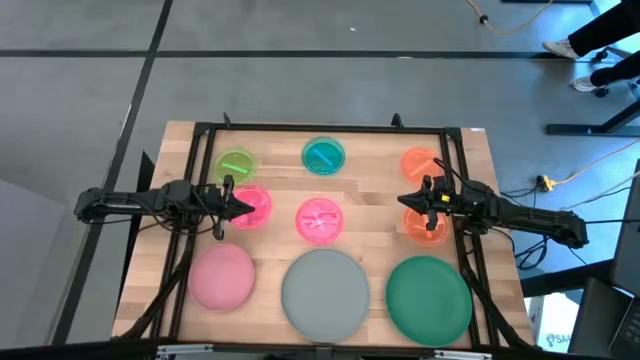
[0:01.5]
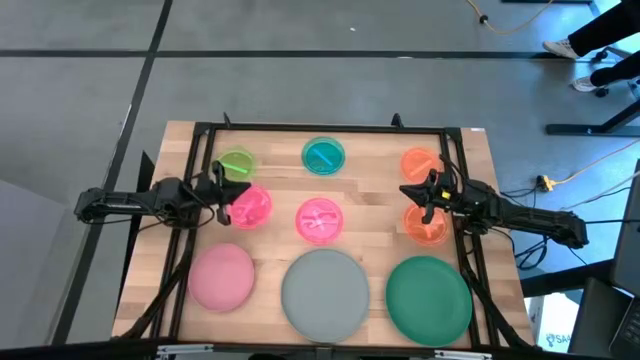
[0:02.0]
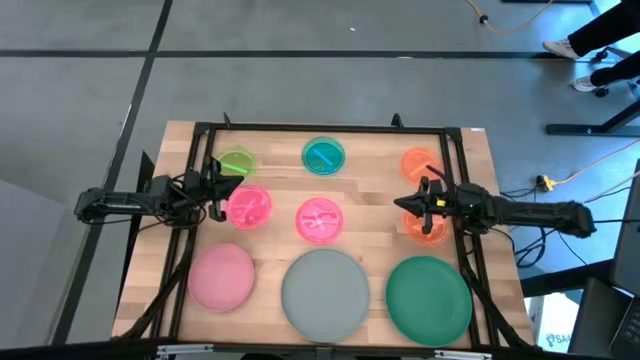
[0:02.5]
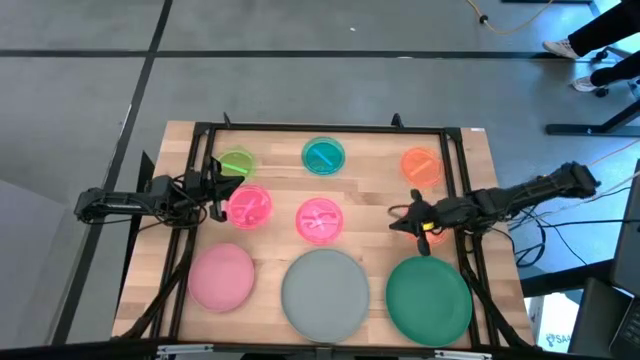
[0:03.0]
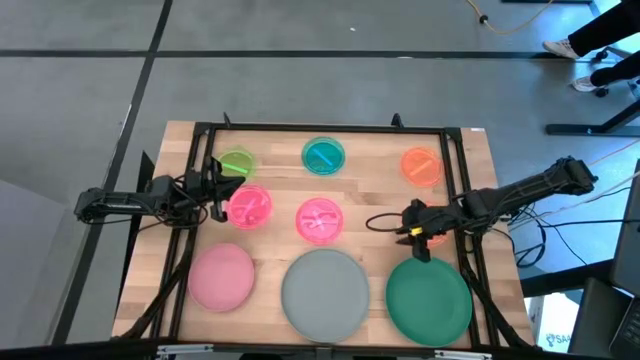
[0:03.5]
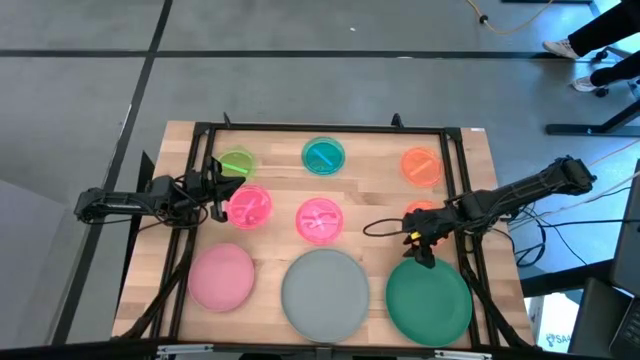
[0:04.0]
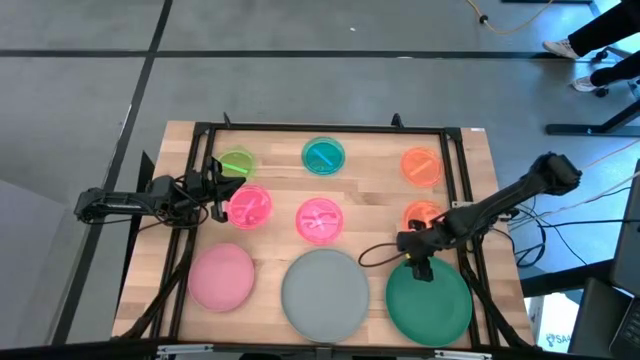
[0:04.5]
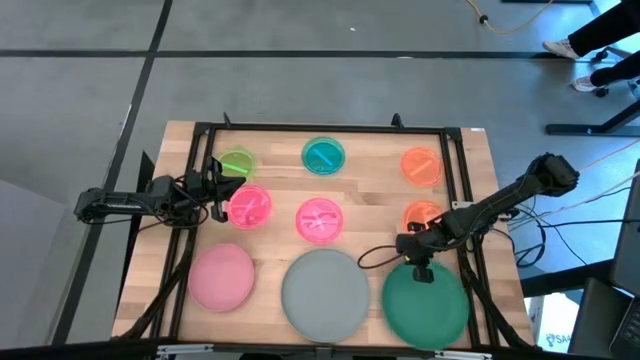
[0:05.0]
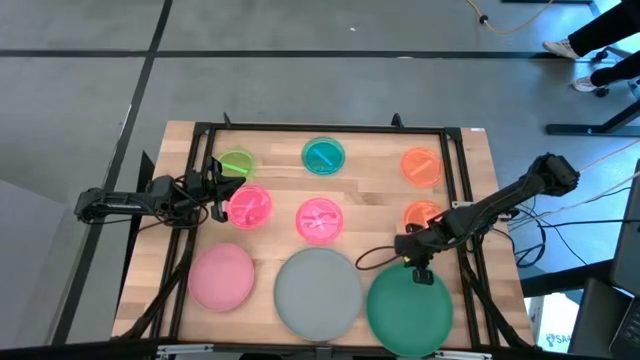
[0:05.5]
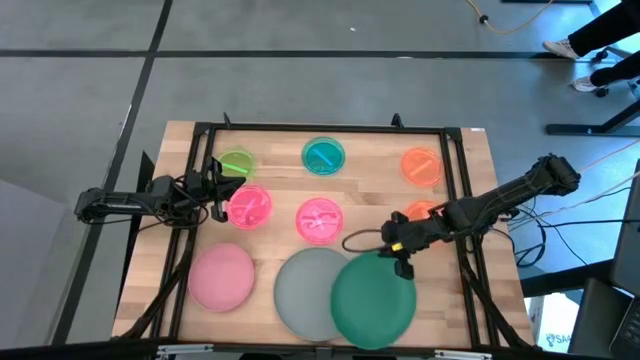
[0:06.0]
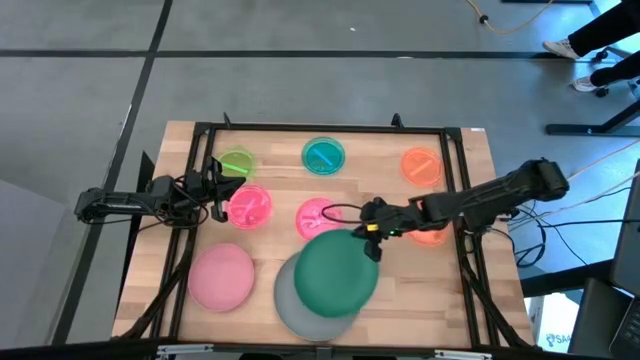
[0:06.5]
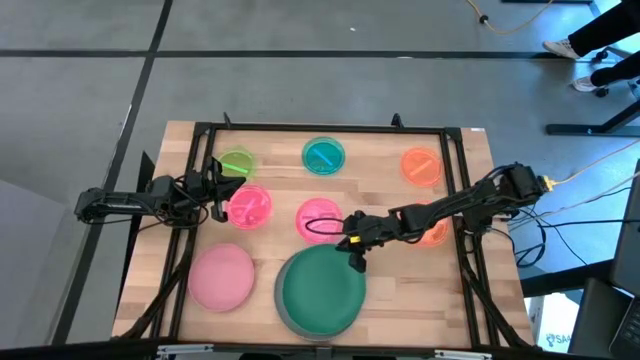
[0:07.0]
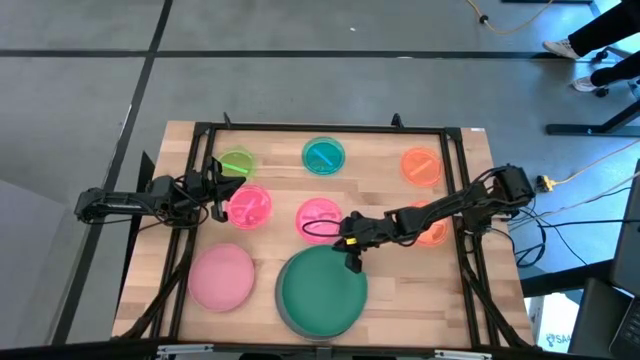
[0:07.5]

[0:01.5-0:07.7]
Task: Stack plastic plates
Stack the green plate on the gray plate

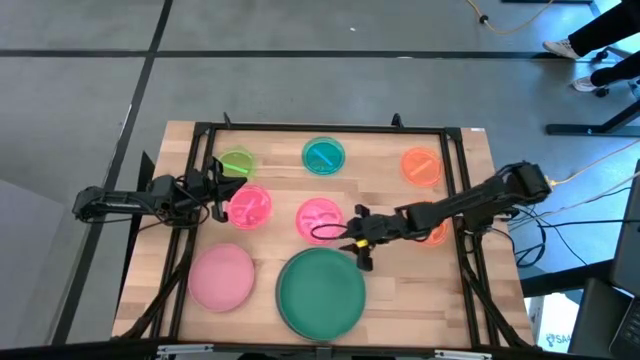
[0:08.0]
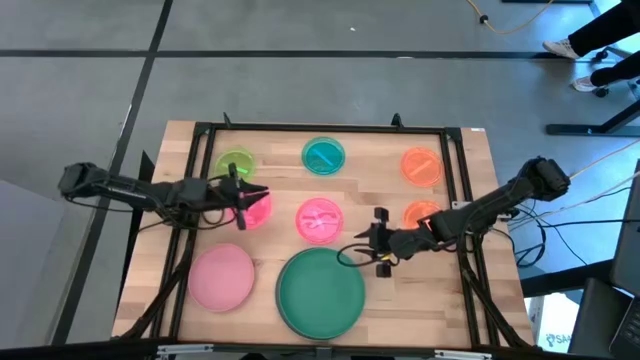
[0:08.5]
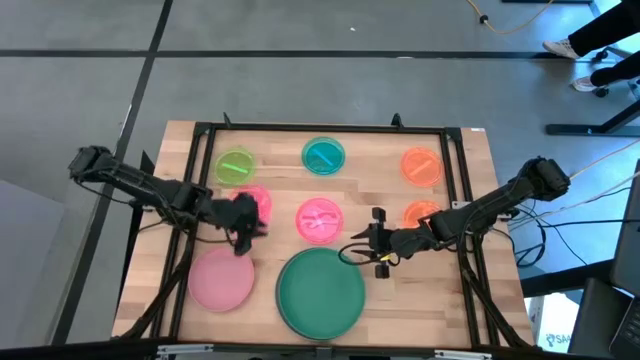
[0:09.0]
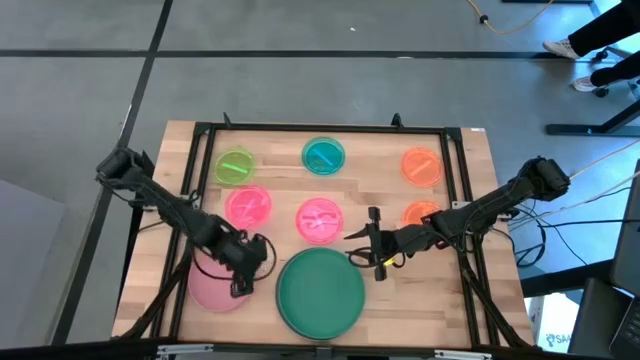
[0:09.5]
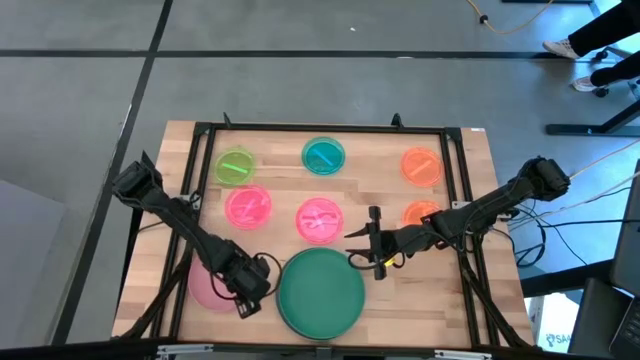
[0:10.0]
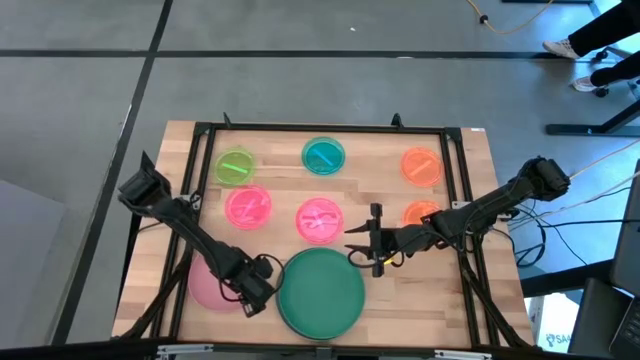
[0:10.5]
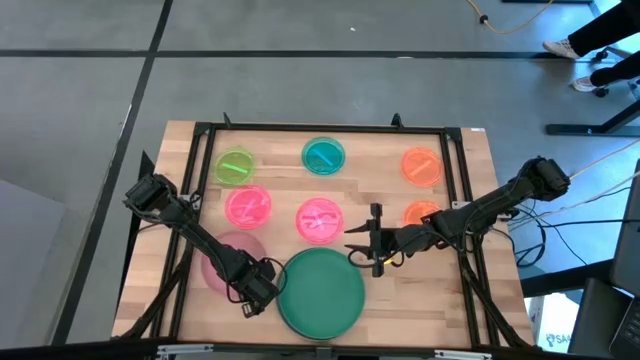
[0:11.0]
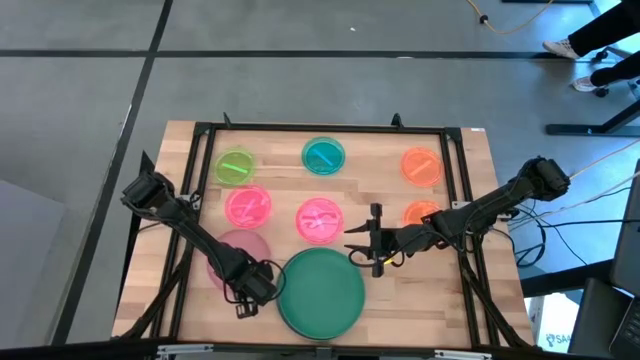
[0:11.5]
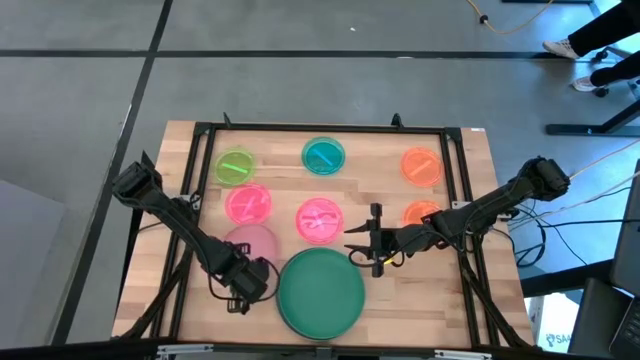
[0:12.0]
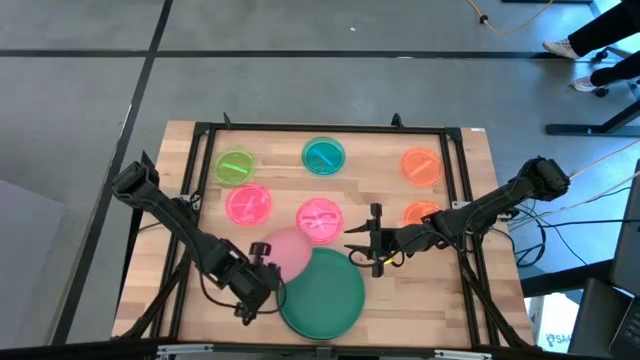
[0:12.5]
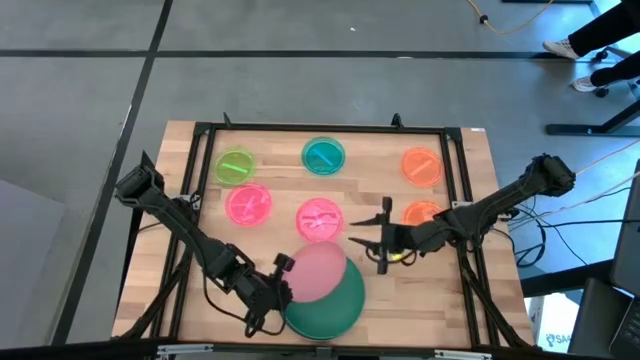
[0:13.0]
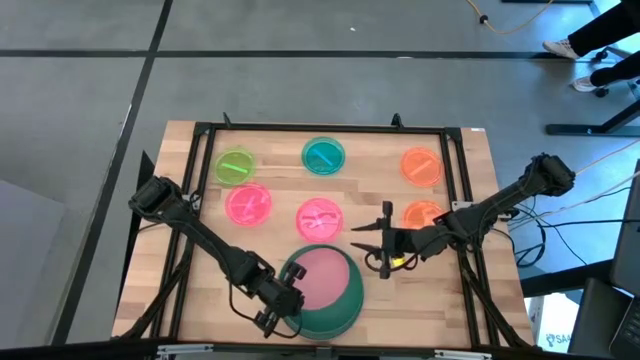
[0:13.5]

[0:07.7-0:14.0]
Stack the pink plate on the green plate

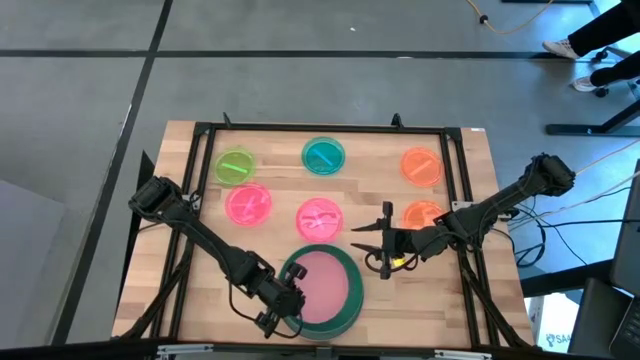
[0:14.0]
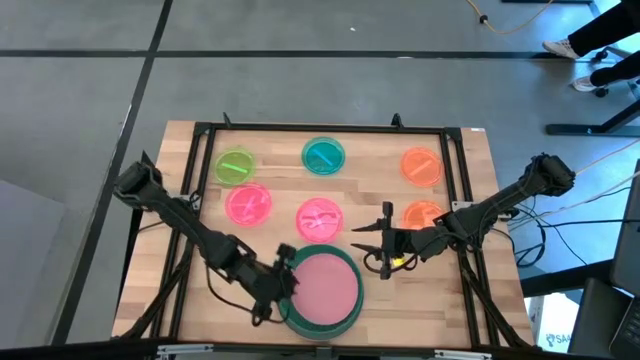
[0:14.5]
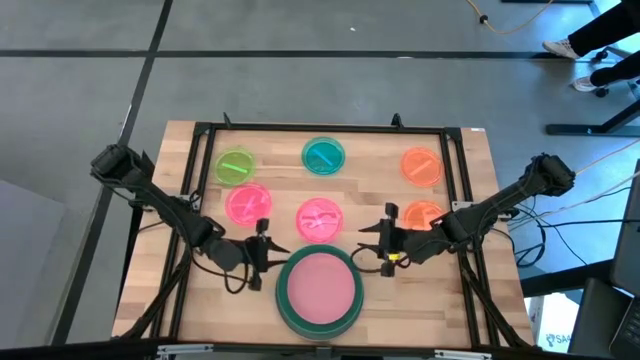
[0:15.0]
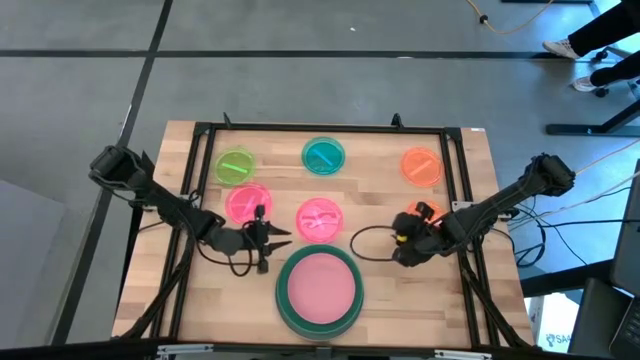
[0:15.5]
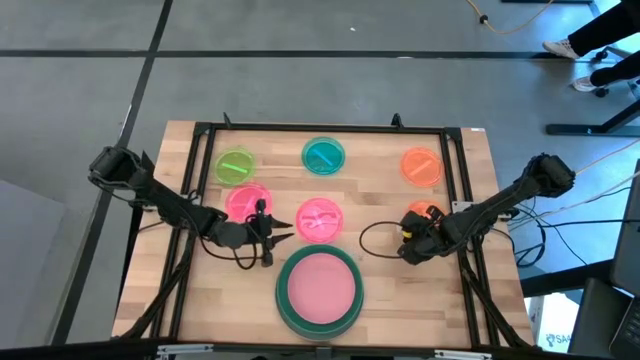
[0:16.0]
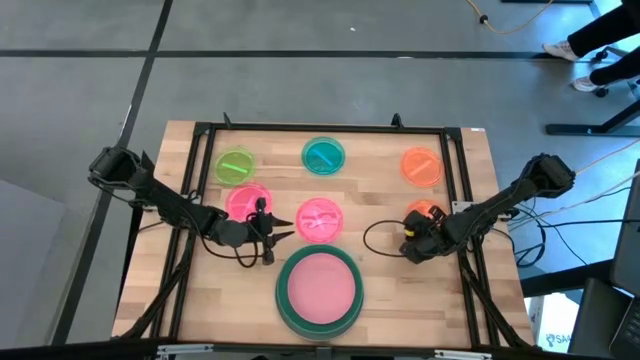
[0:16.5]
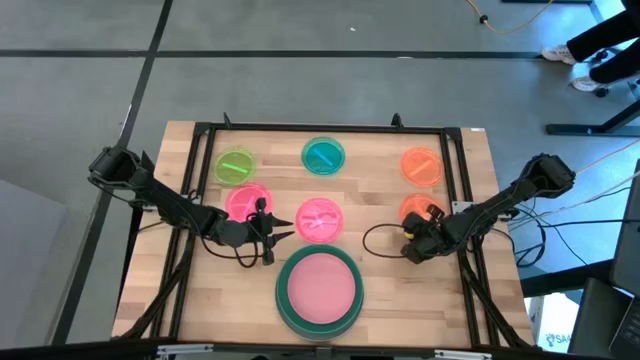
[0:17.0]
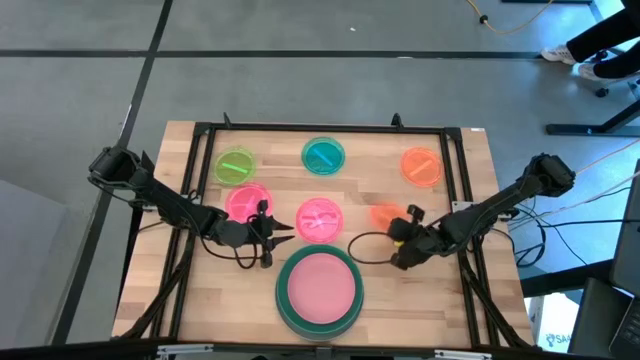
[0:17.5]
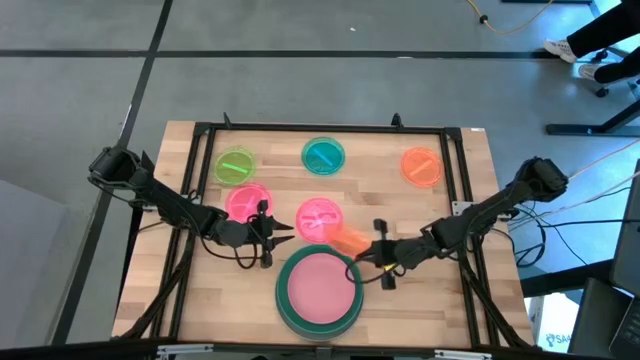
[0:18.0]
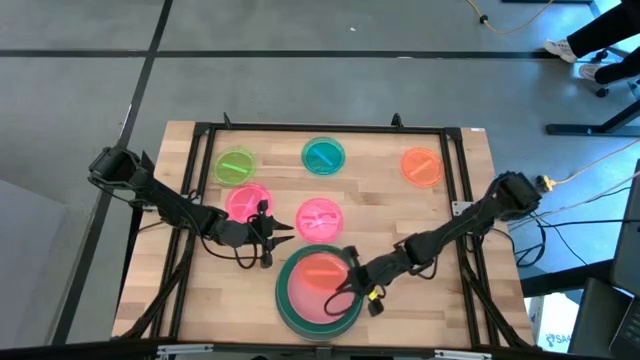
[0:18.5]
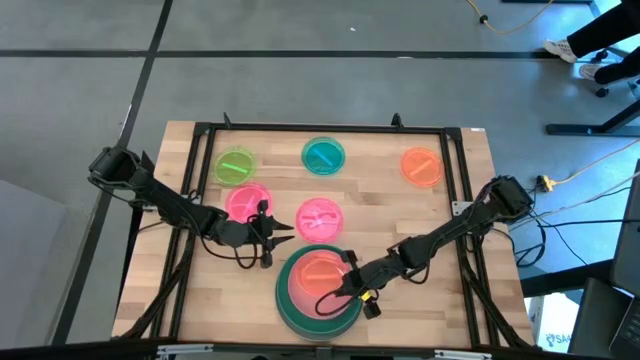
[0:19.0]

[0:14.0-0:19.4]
Stack the bottom orange transparent plate on the pink plate

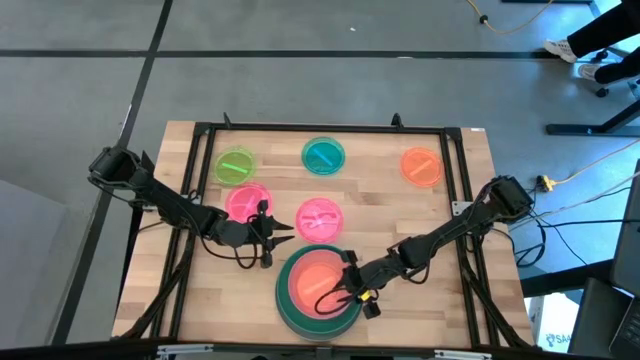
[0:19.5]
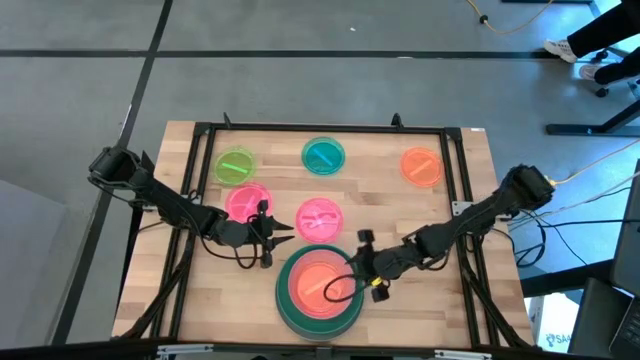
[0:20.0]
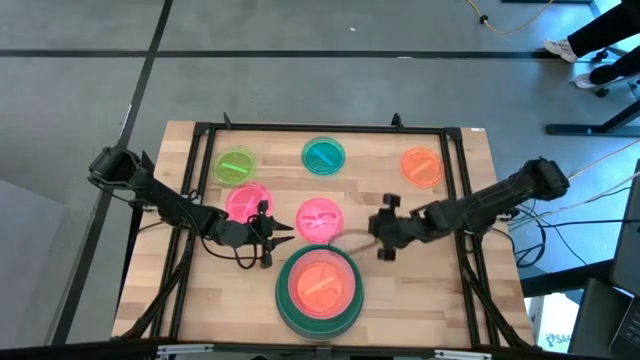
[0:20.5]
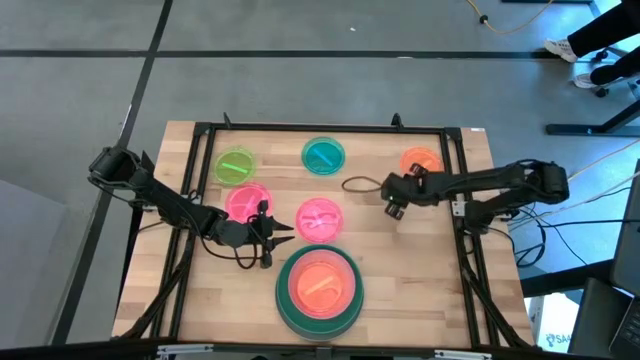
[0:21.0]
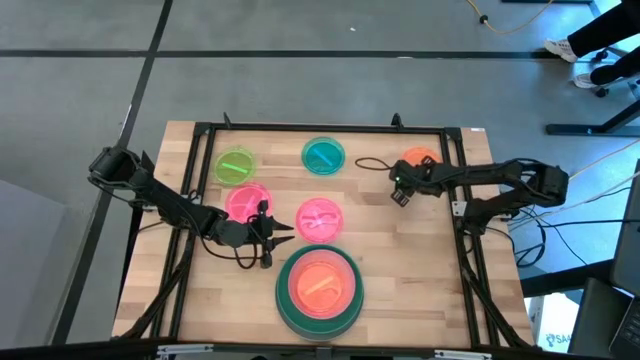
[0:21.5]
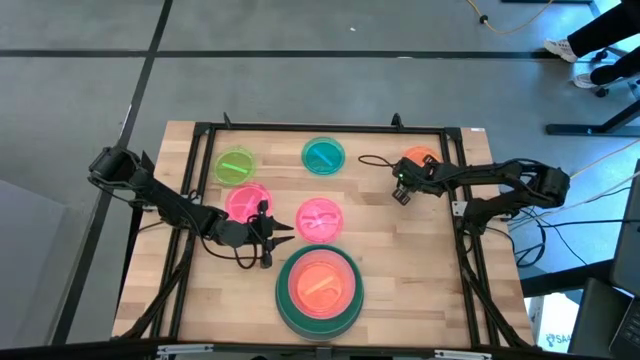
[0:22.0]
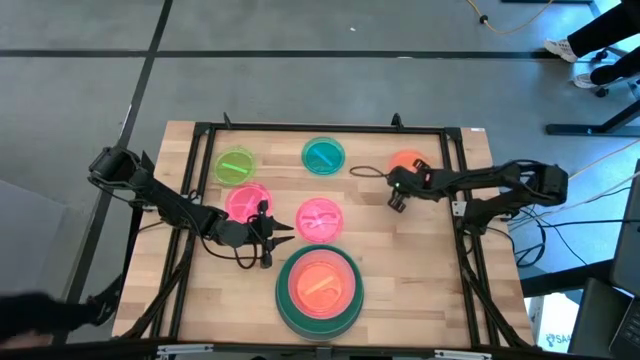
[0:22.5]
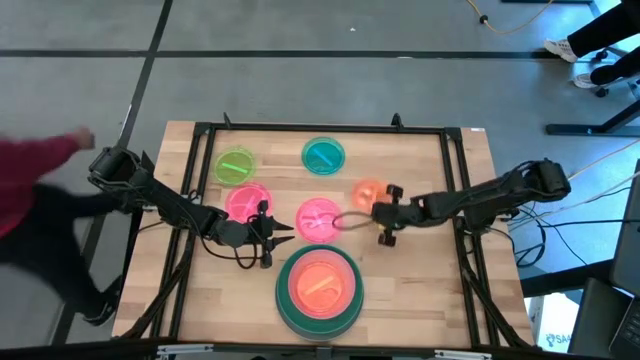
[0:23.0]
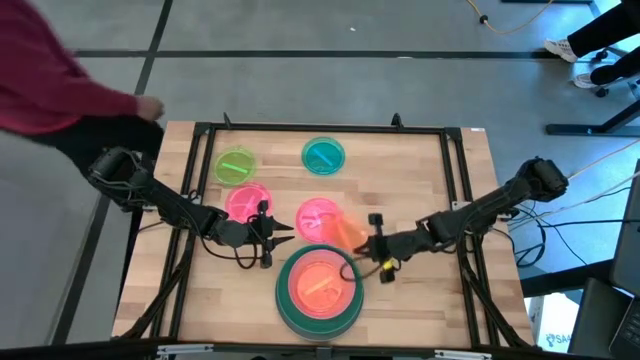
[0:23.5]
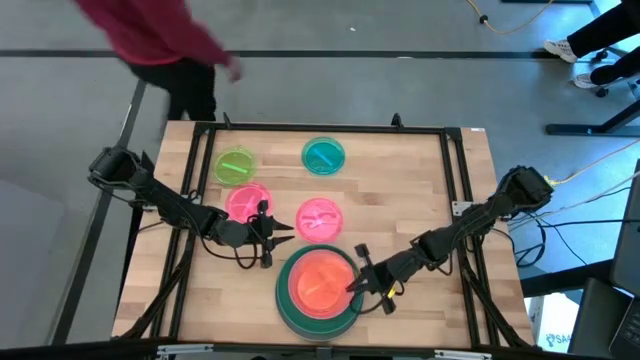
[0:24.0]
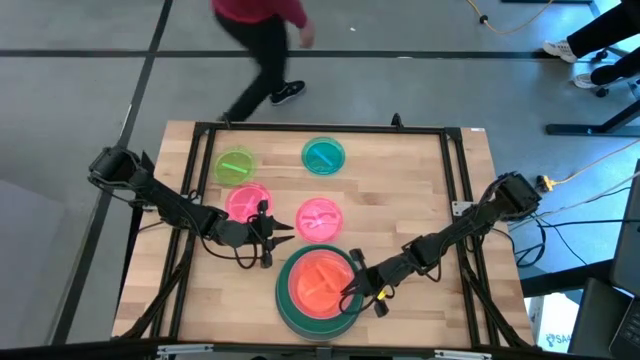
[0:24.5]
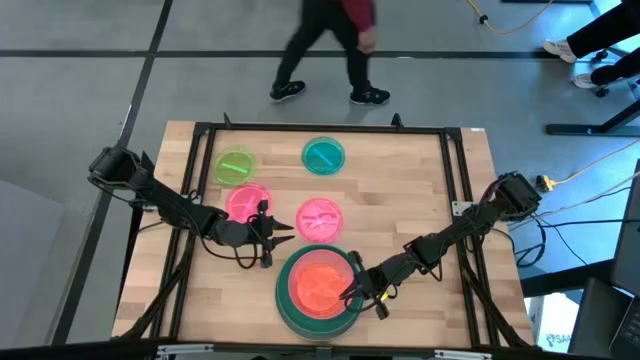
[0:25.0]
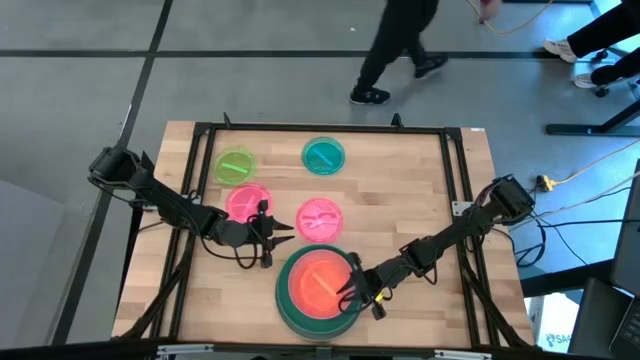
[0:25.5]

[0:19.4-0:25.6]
Stack the orange transparent plate on the orange transparent plate
